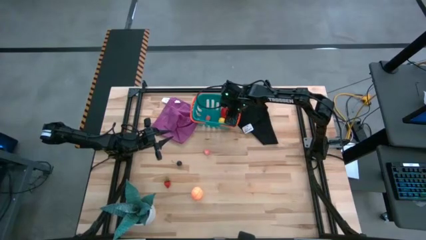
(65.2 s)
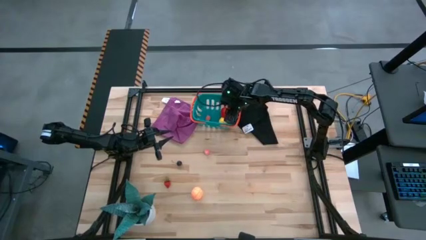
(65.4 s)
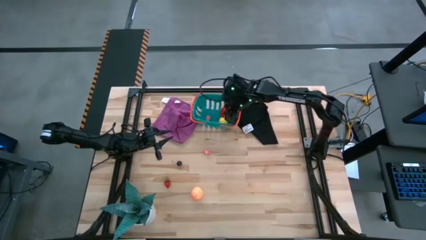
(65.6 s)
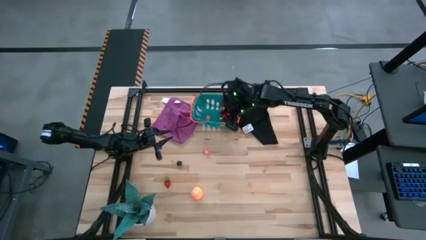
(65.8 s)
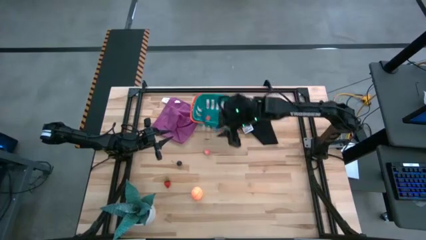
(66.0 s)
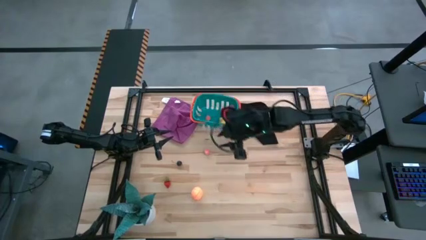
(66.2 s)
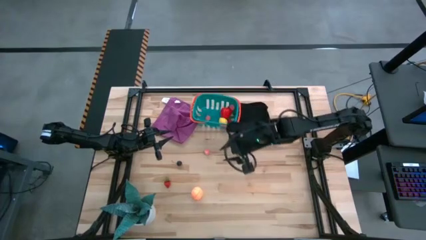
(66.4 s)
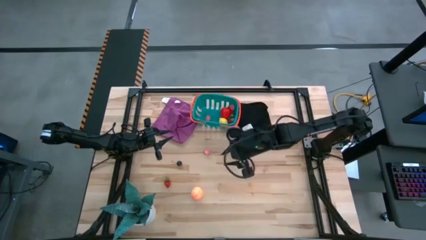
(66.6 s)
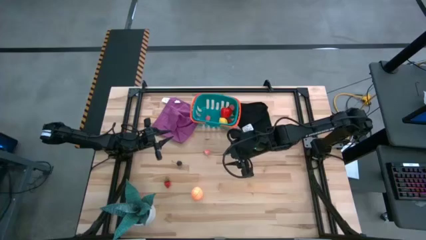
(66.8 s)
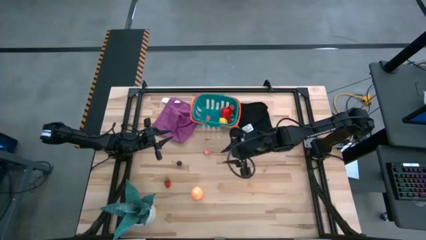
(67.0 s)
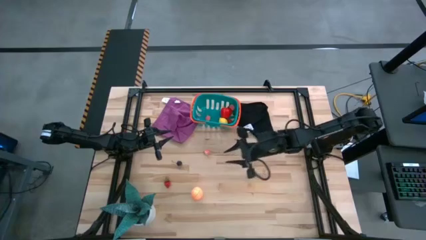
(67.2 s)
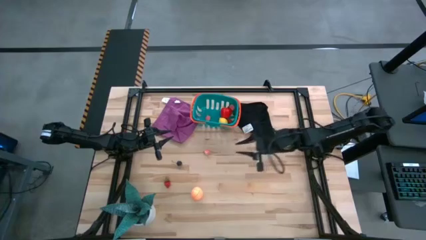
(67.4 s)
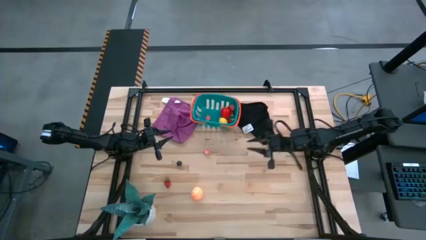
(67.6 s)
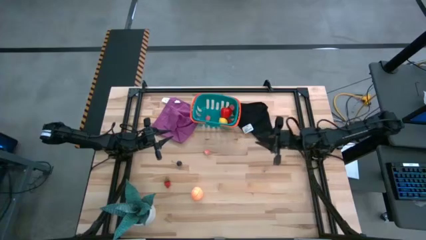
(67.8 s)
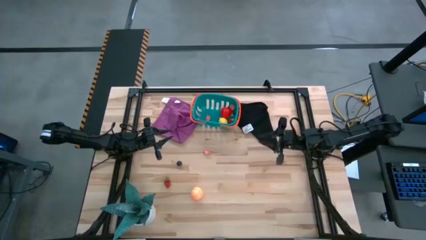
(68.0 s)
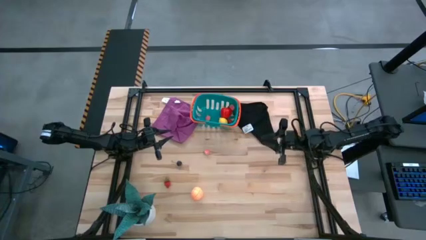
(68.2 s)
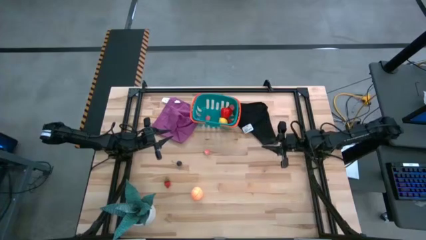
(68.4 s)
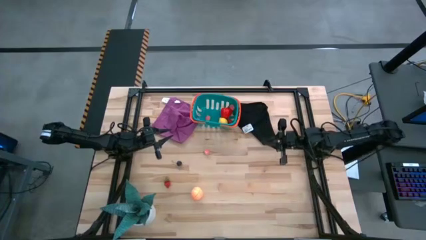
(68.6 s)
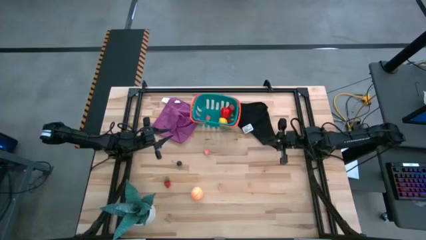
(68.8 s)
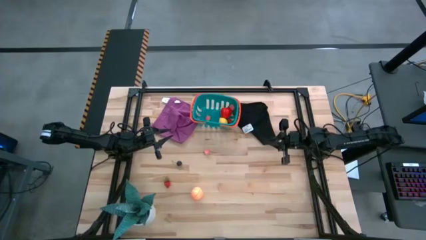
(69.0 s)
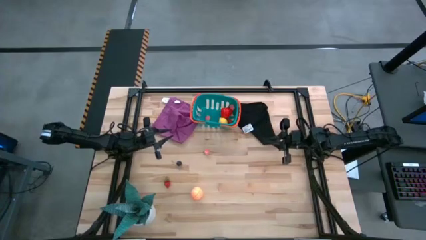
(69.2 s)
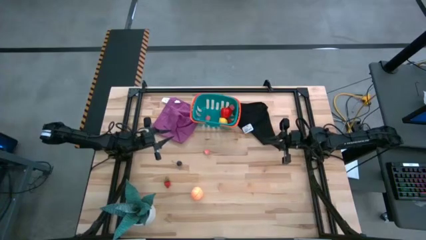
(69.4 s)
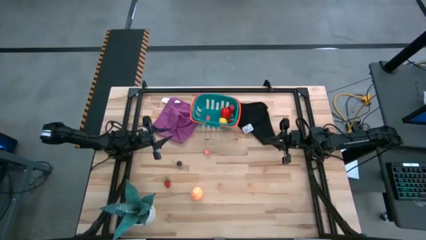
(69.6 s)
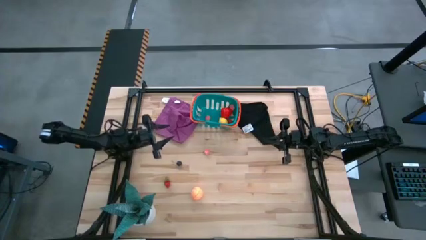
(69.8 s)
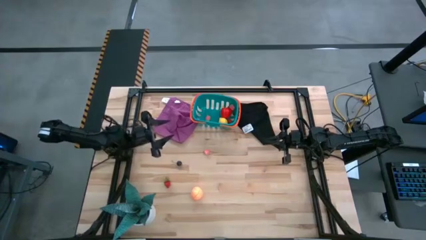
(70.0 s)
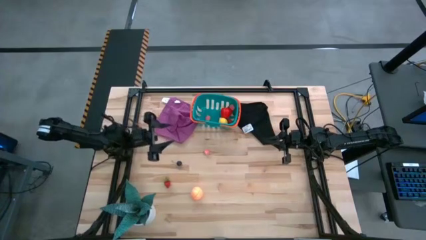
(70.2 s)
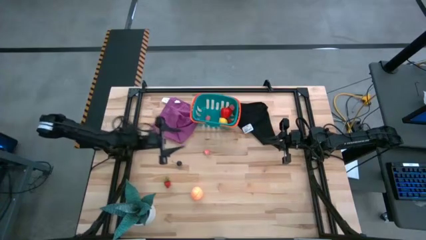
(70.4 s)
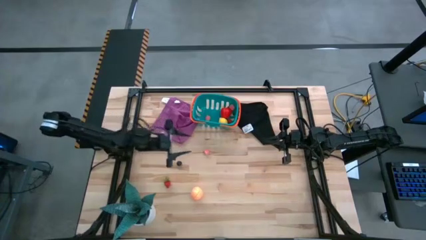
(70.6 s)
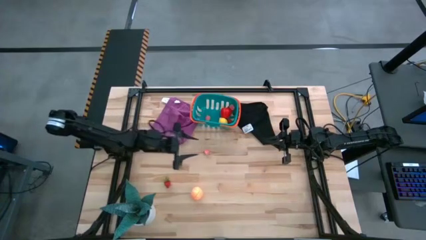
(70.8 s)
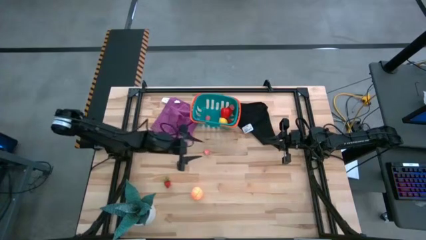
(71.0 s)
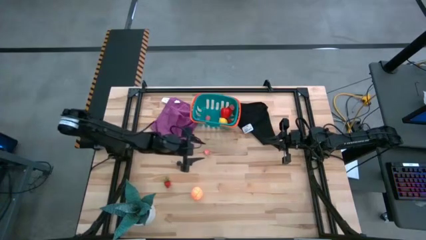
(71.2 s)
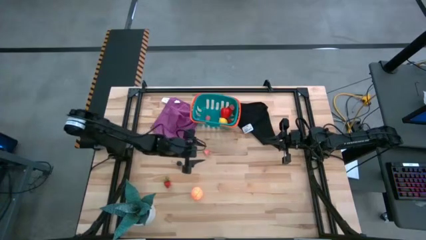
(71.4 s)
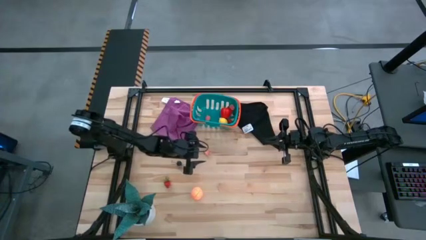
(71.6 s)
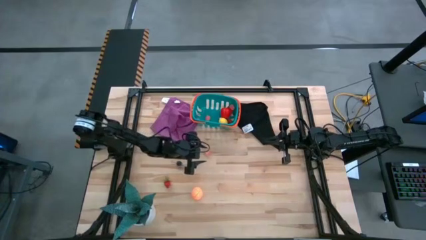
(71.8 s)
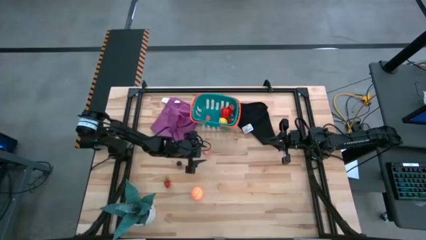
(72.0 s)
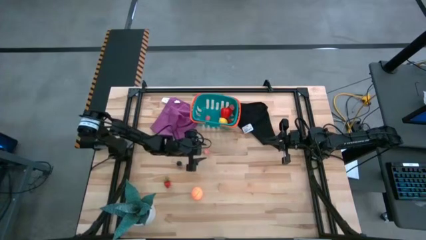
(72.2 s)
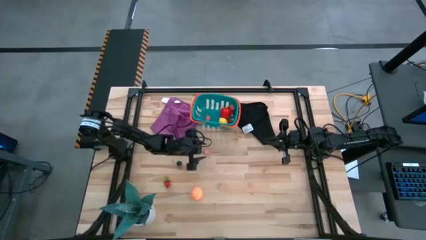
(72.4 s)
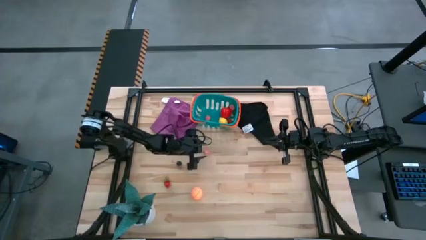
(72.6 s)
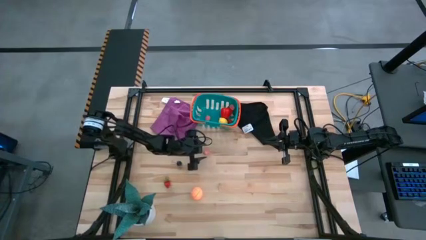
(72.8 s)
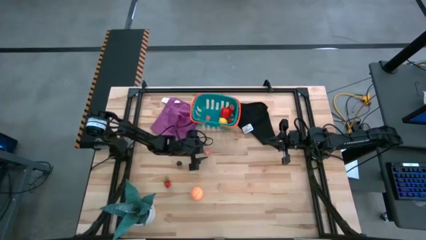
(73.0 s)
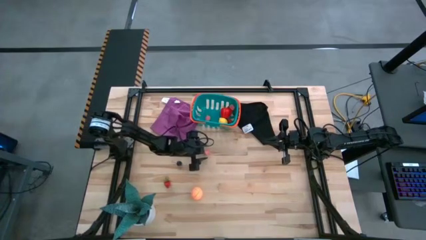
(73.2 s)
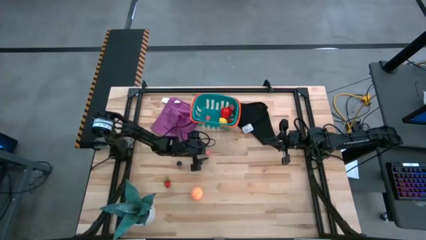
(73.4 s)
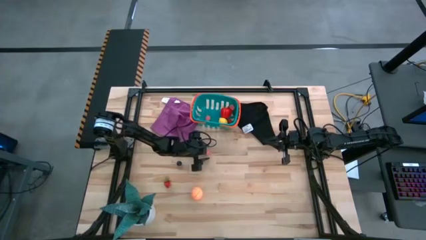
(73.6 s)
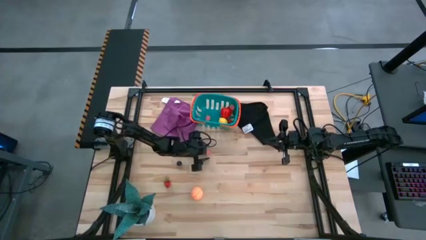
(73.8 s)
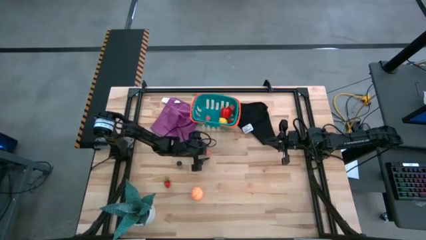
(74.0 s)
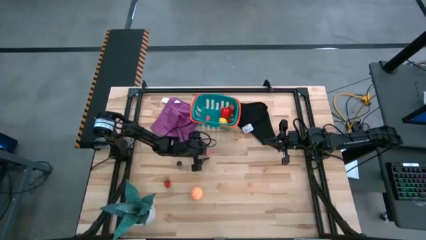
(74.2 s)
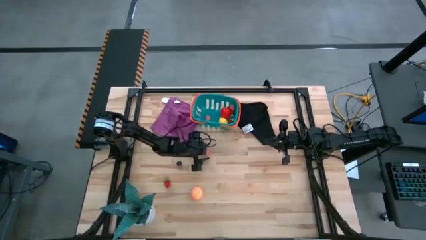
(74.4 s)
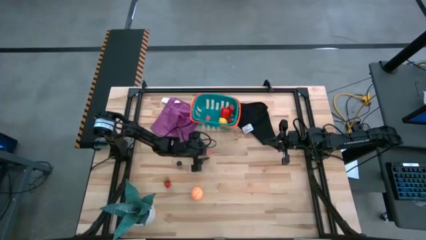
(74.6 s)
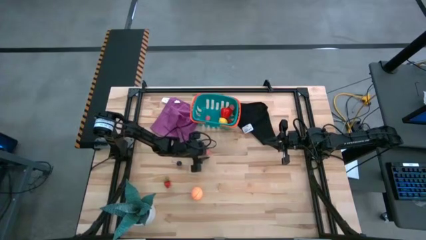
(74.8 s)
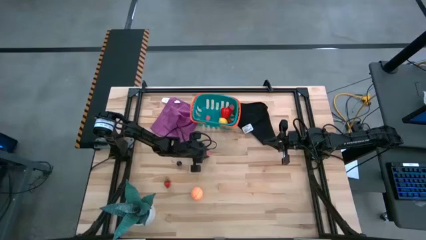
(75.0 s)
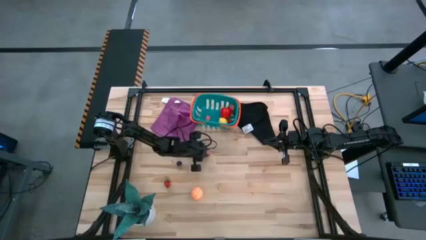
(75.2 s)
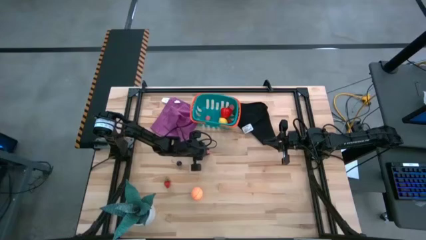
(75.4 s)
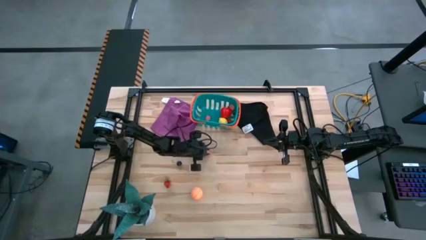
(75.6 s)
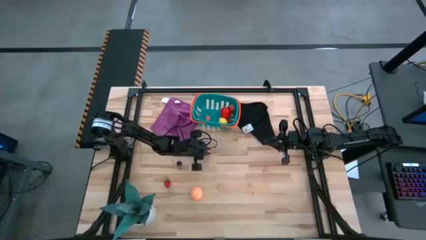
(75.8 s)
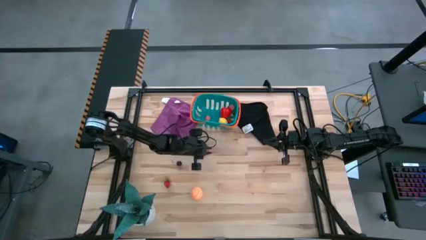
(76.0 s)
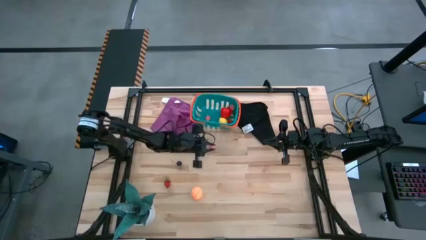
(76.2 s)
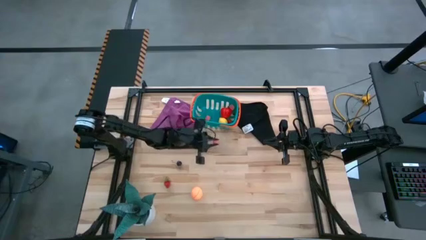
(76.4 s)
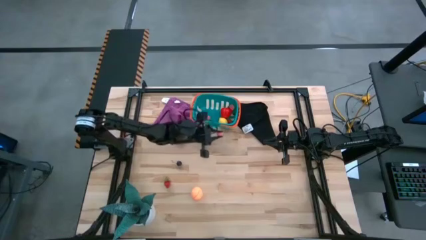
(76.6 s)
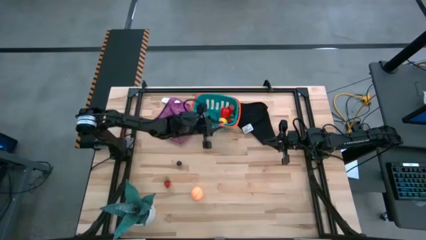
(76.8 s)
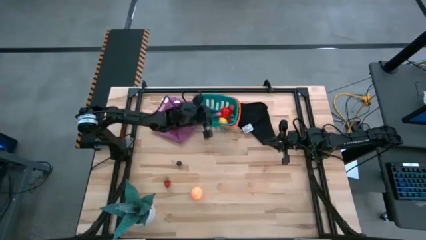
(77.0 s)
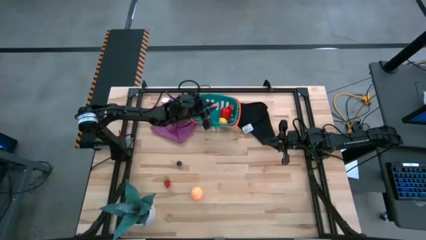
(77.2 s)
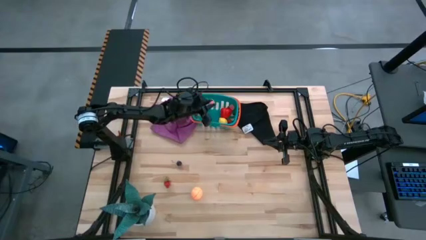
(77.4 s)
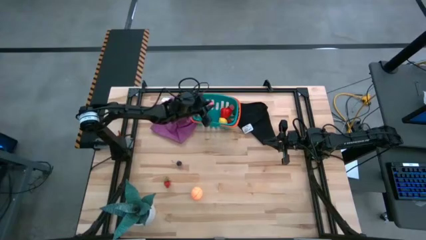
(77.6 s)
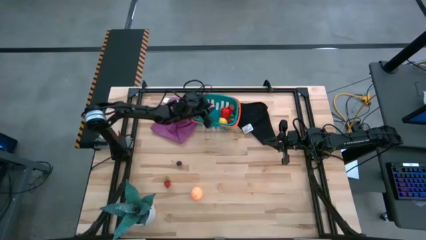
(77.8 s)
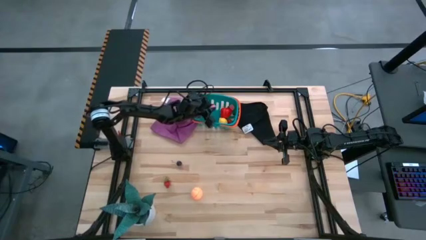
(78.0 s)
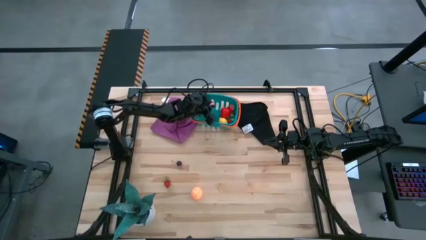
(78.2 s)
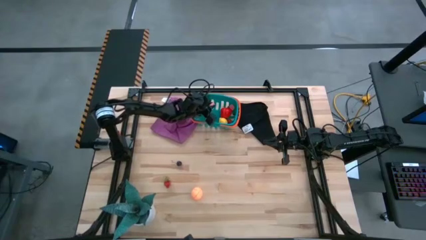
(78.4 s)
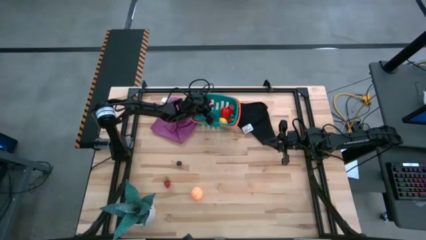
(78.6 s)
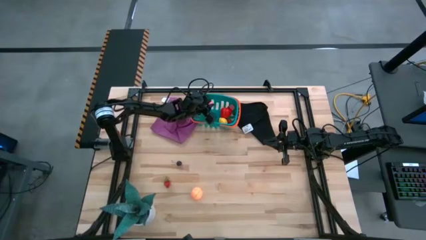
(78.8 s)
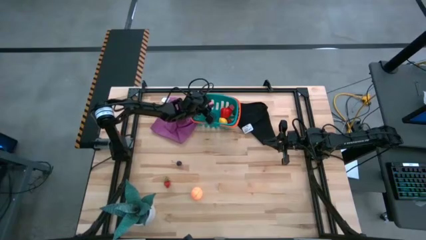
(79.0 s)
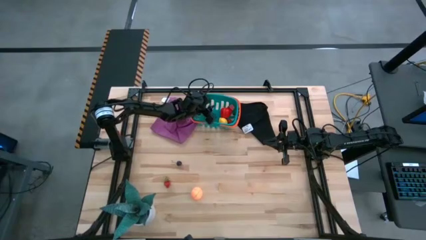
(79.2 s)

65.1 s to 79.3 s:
Task: Pick and placing Produce into tupperware
Put the pink peach into the blue bin
